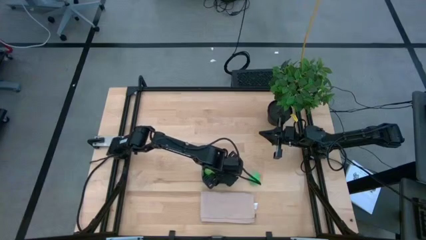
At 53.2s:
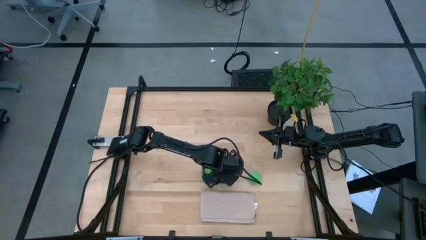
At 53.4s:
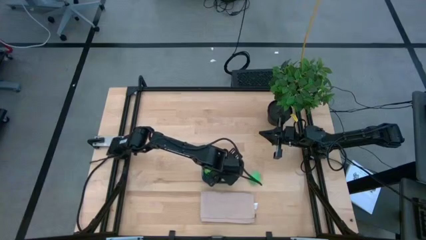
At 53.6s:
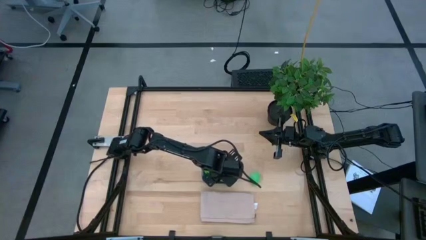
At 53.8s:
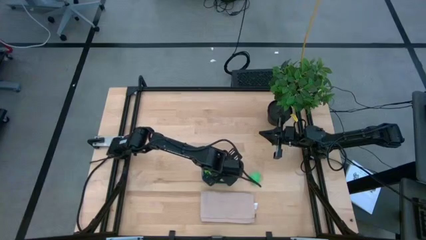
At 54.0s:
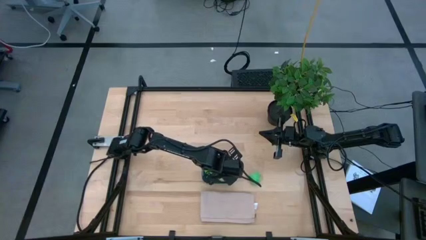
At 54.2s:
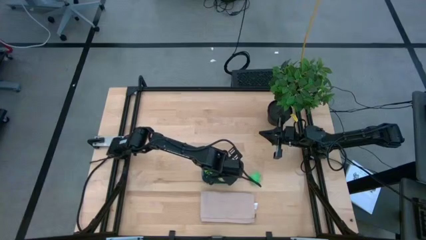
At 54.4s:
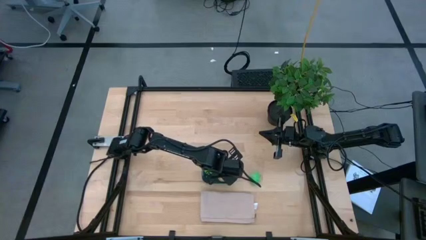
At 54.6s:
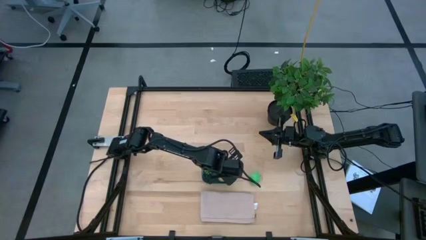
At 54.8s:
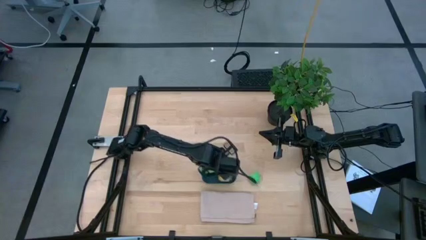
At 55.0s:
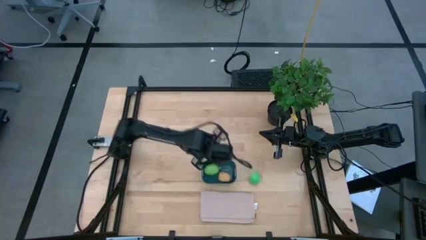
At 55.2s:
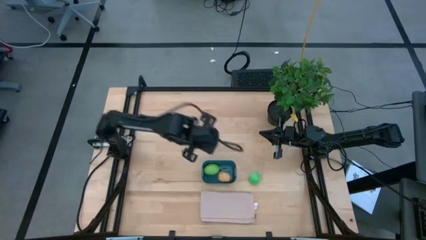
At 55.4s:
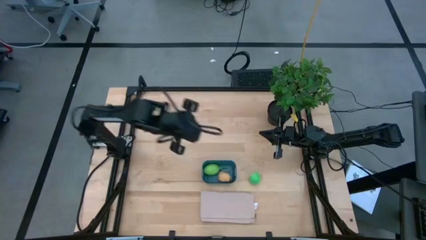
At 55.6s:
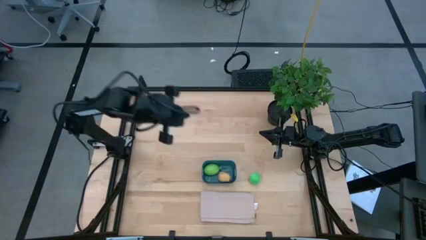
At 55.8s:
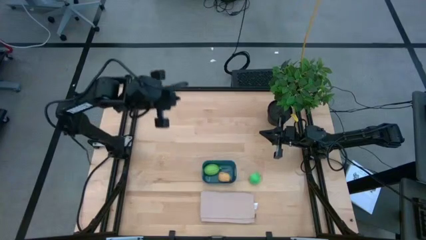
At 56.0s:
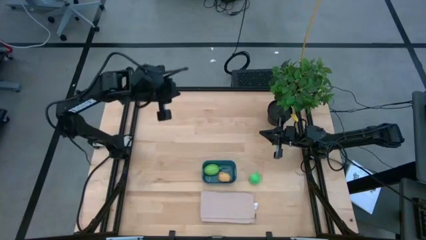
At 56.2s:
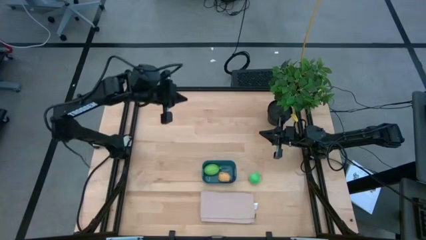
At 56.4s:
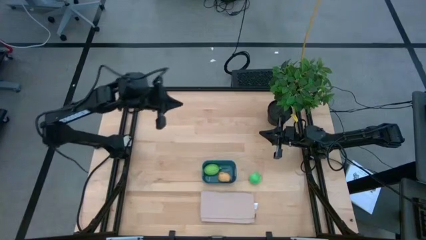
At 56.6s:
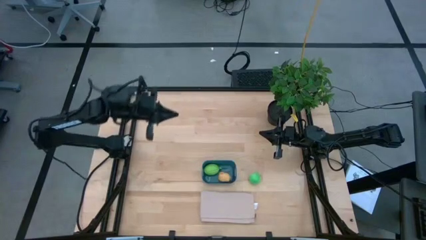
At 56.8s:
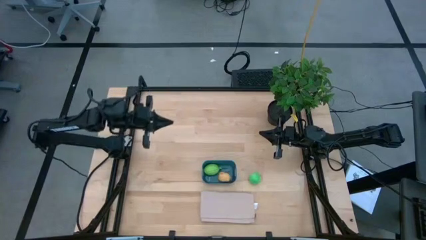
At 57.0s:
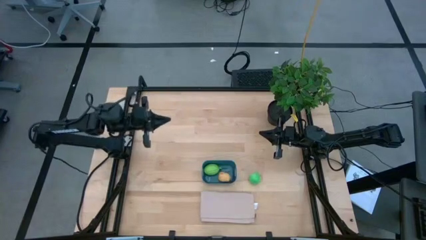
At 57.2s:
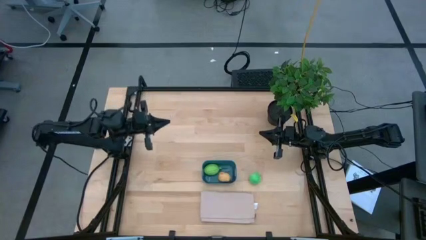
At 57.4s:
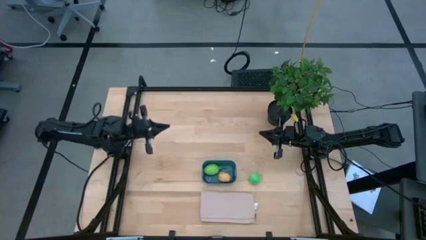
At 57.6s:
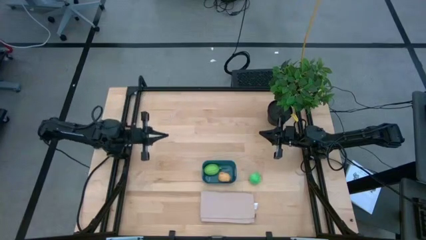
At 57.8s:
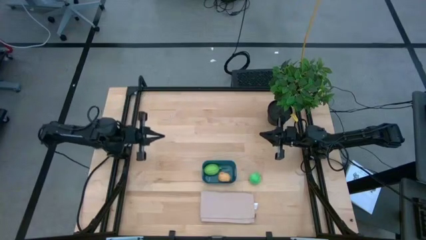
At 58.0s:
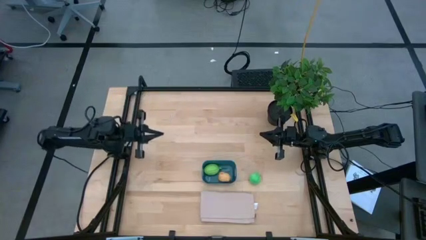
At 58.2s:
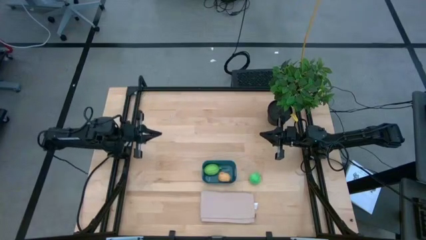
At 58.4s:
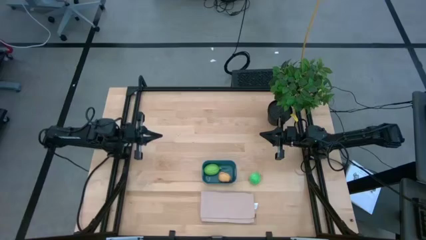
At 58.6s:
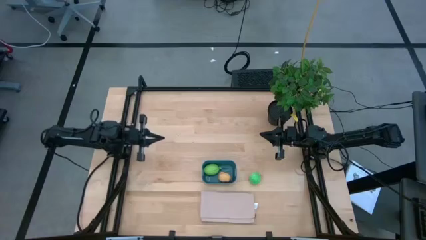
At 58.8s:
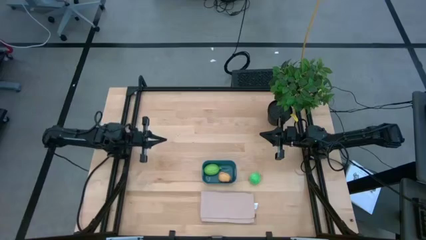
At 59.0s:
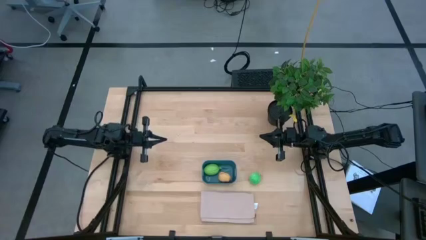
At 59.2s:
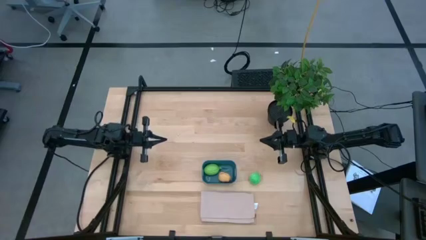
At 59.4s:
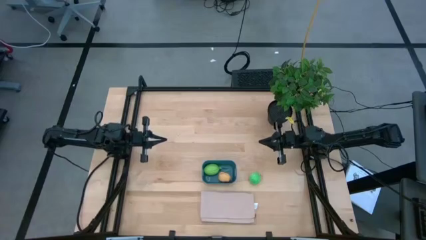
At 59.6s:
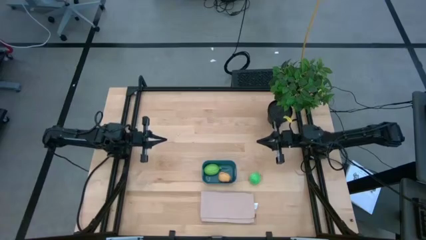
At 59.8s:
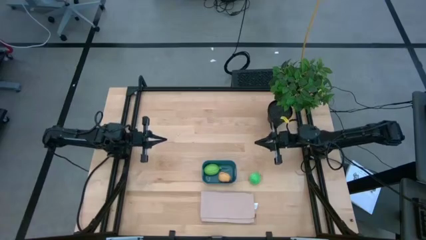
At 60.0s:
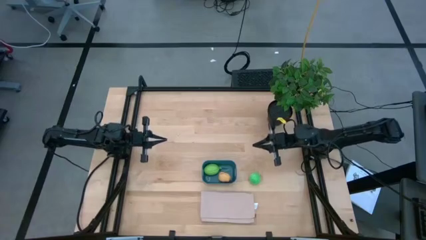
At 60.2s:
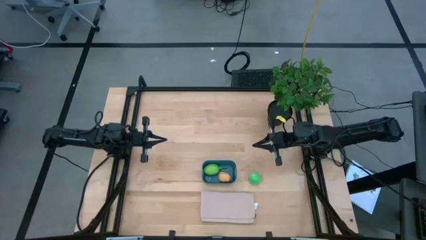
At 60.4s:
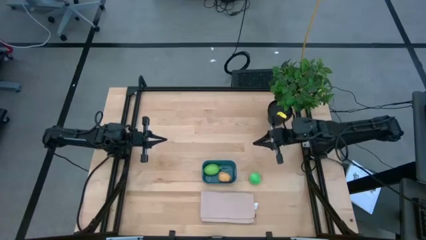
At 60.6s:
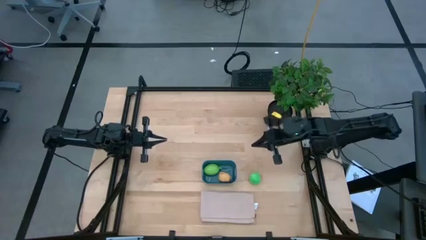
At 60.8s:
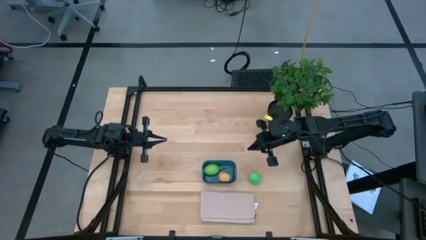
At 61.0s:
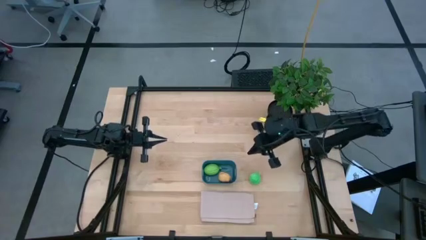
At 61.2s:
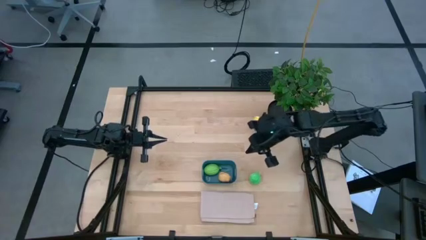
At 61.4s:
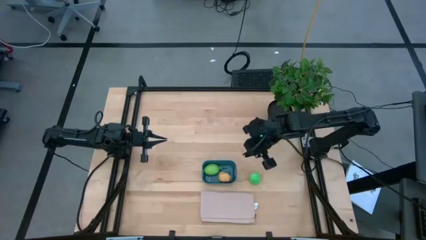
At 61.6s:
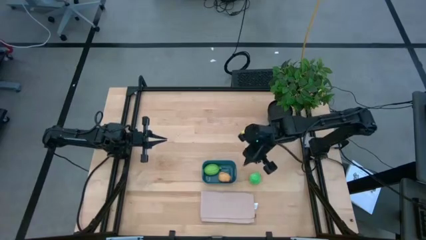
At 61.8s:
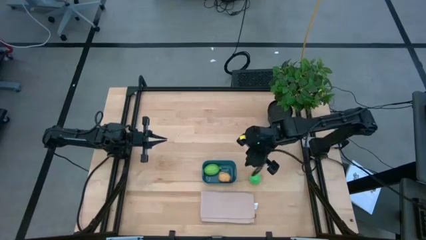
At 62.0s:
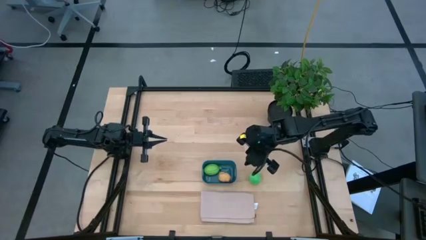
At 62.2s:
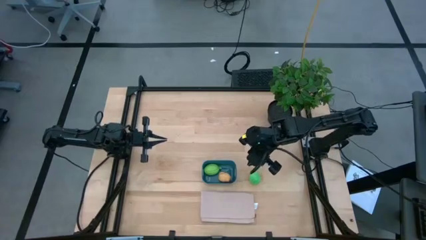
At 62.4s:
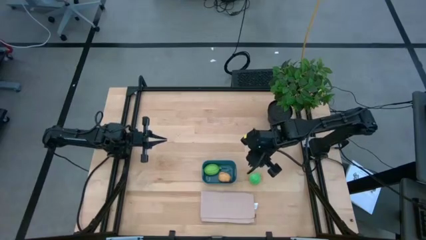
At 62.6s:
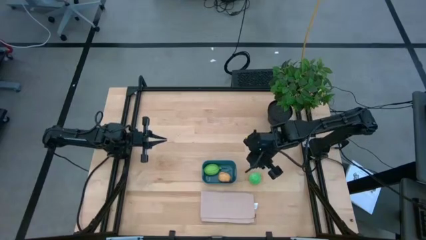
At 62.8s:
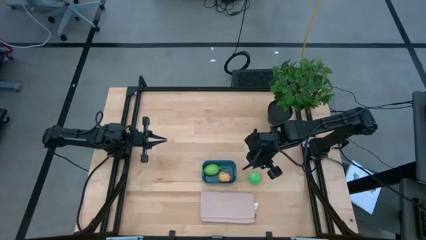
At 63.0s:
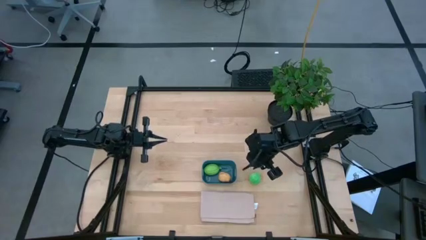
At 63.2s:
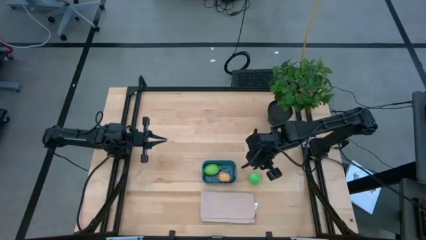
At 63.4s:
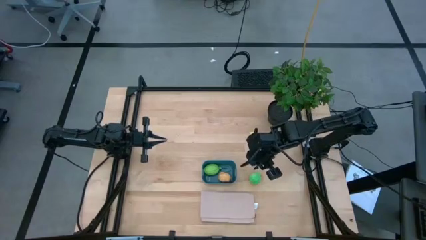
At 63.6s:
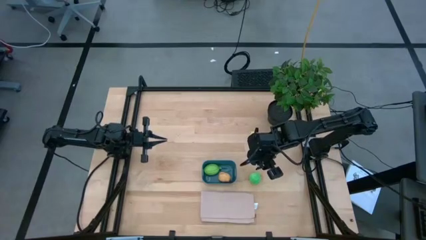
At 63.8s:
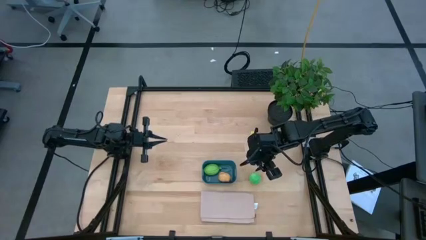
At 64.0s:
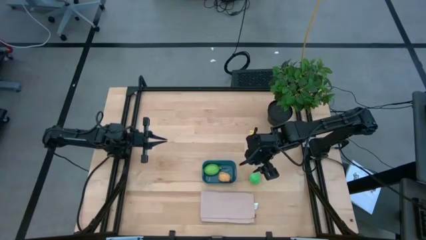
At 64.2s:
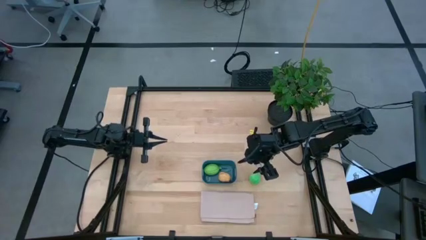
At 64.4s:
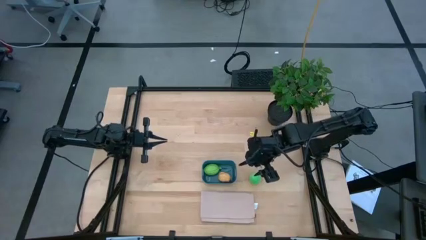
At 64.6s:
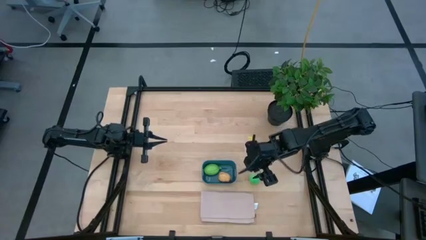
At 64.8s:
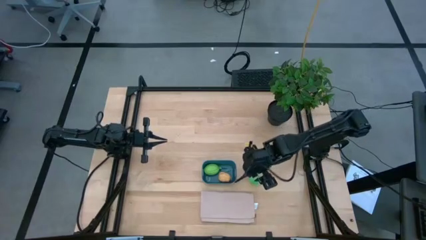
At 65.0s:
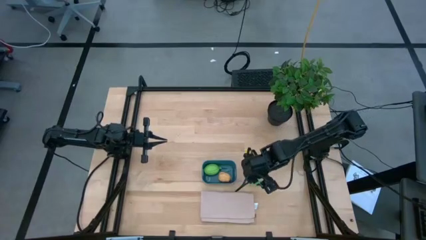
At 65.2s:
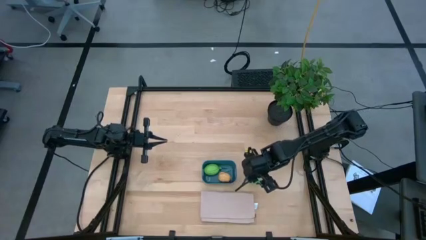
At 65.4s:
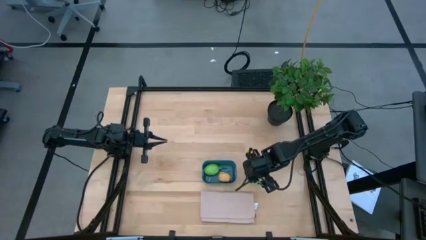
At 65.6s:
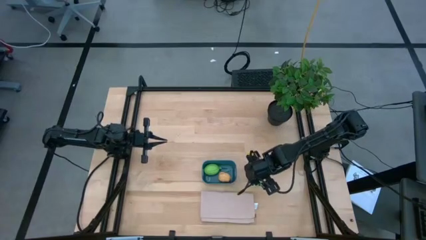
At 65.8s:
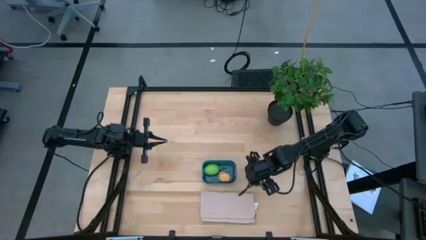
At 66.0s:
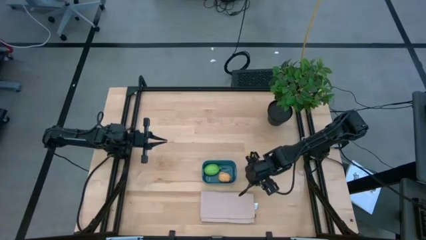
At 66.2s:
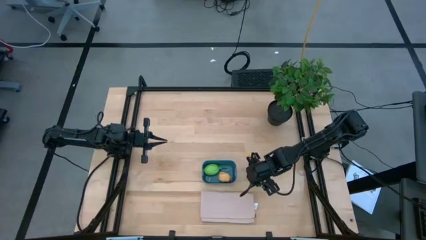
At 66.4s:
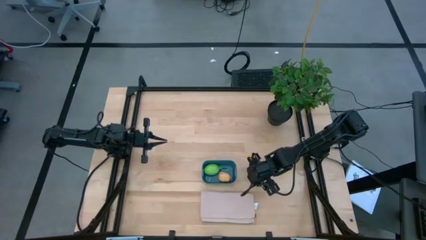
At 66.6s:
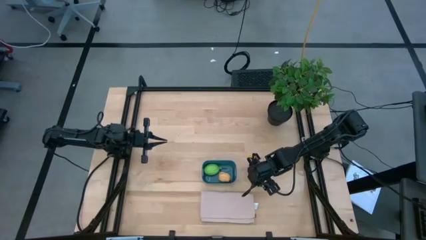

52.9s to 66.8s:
Task: Pick and placing Produce into tupperware
Put the green avocado into the dark blue bin

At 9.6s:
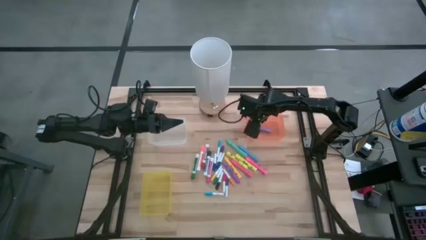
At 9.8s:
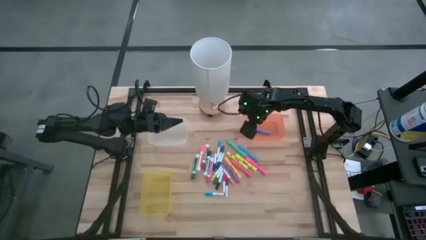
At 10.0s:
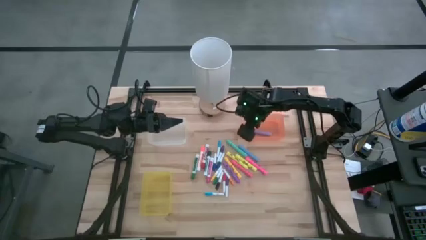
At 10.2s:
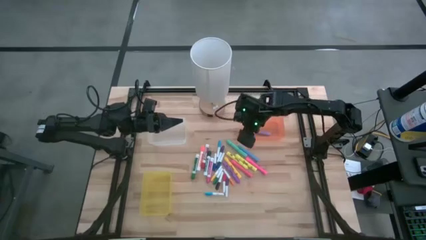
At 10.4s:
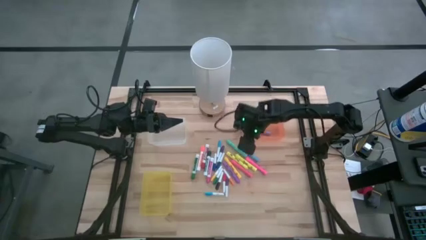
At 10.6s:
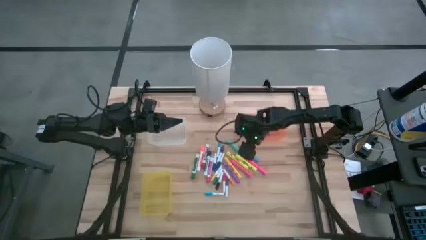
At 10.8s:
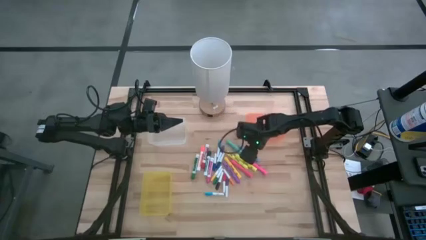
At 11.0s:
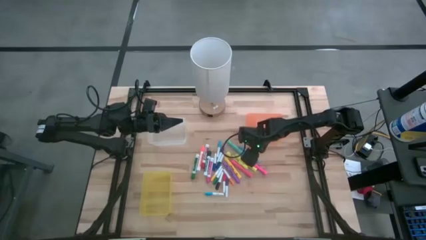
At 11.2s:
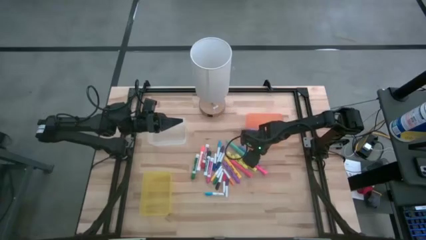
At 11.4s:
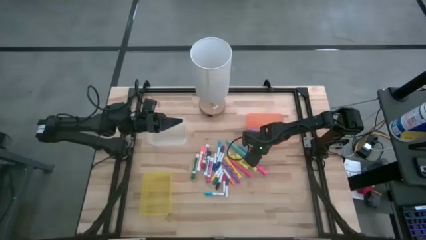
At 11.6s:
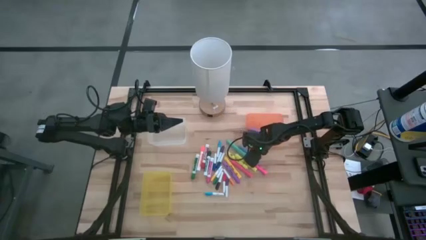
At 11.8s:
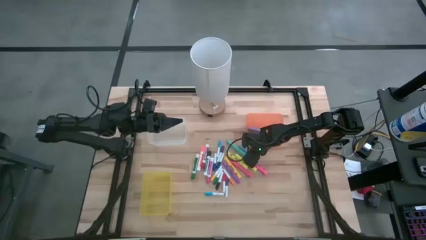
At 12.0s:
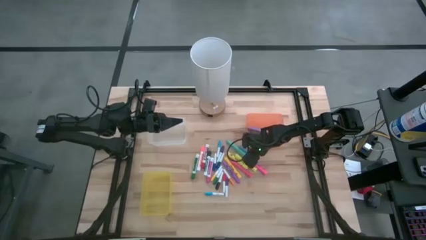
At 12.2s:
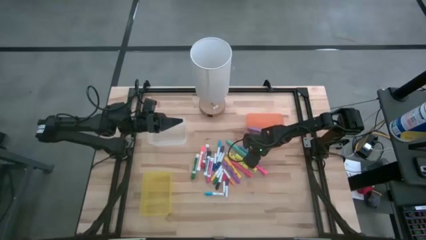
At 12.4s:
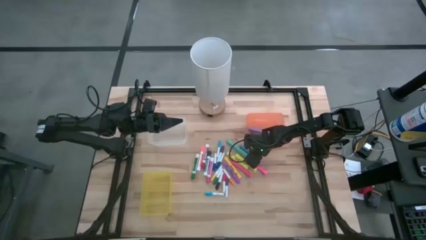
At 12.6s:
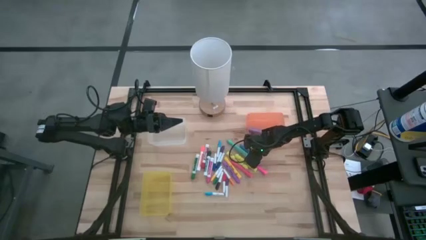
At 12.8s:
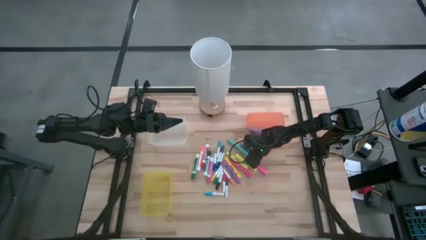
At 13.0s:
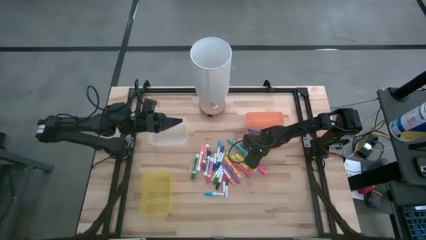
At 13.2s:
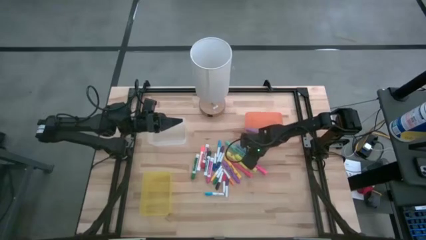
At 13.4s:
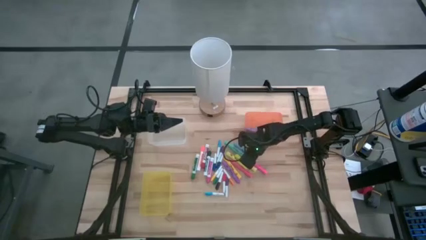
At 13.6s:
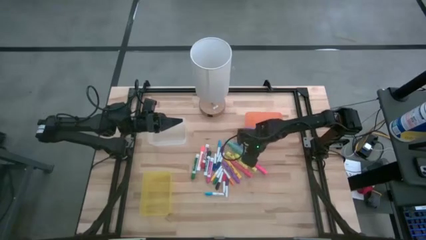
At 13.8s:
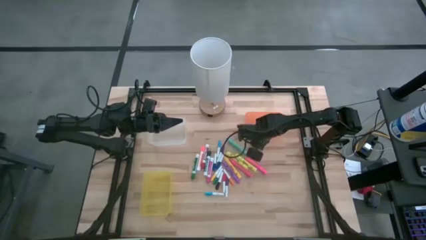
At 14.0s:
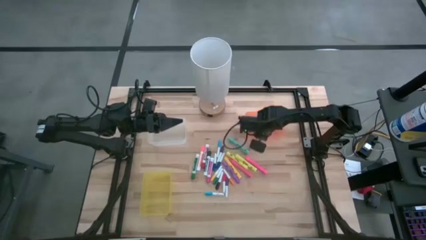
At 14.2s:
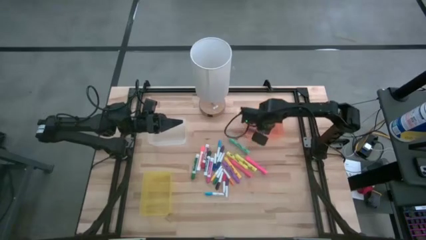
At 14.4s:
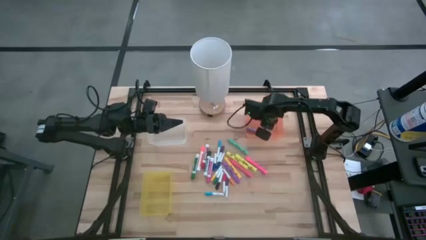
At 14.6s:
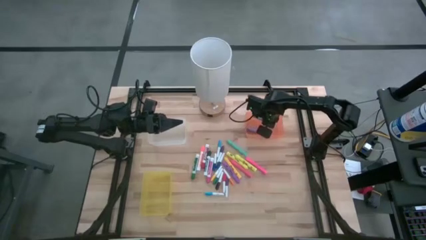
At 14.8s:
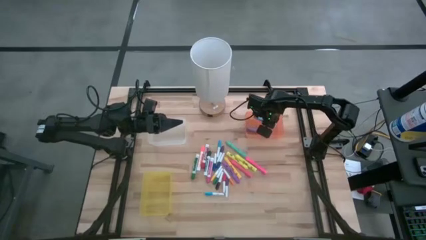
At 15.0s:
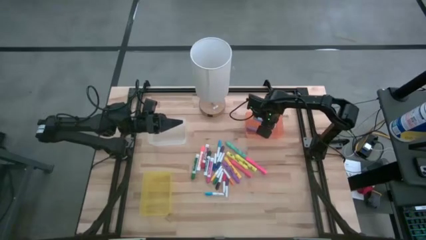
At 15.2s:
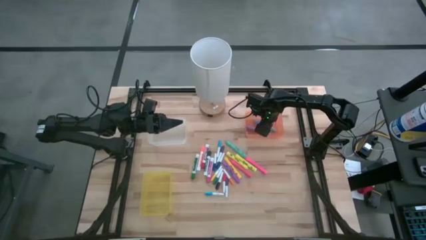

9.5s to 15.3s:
Task: Pick & Place Markers
Put the blue highlighter pen into the orange bin
